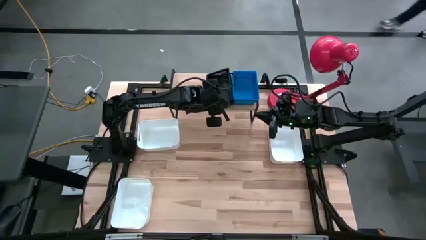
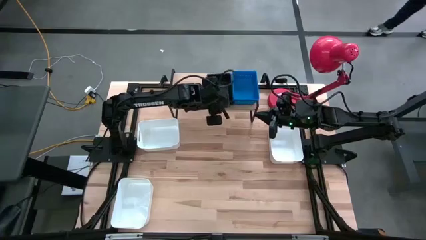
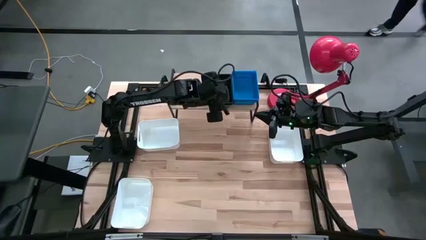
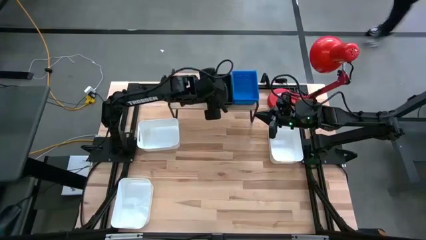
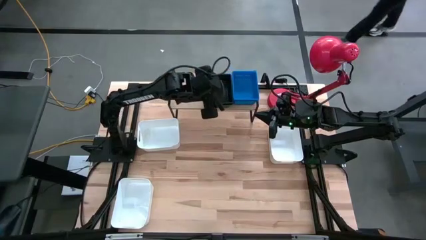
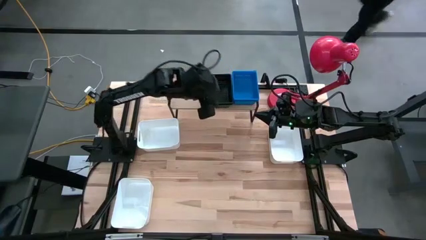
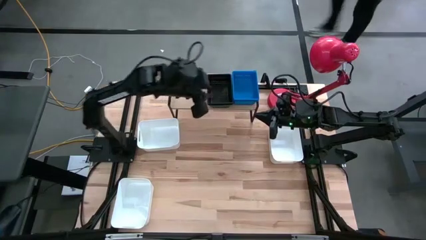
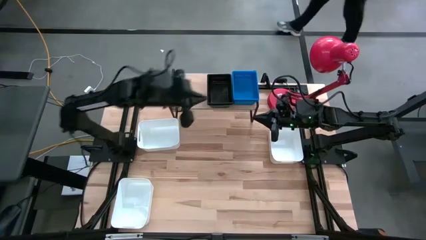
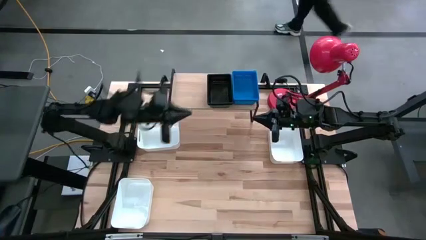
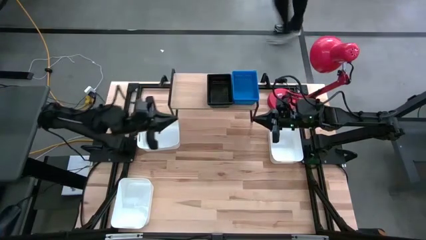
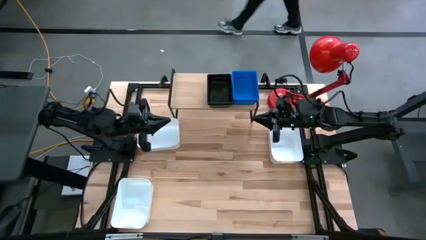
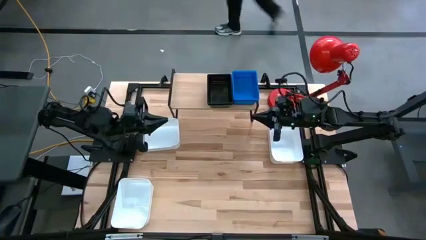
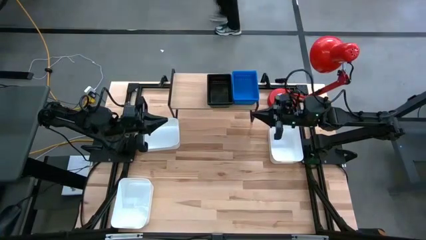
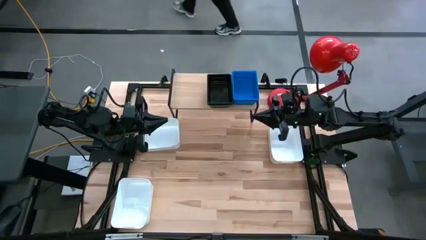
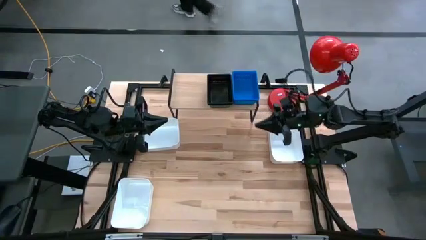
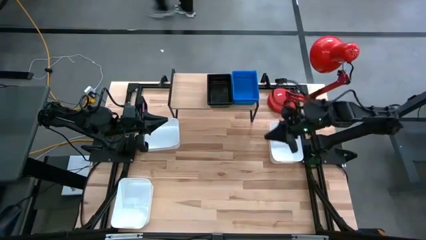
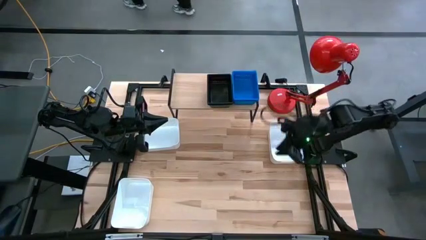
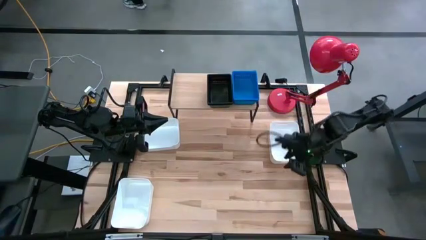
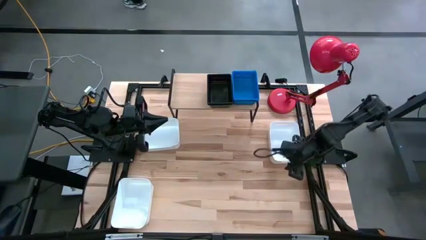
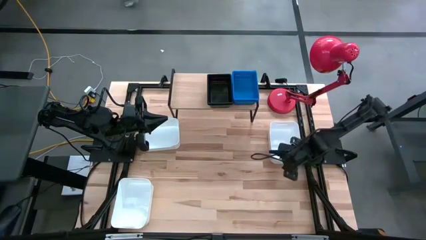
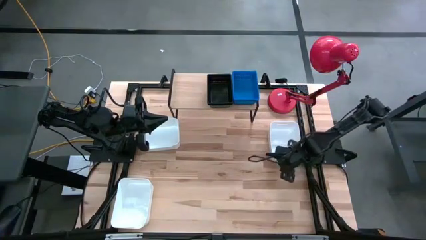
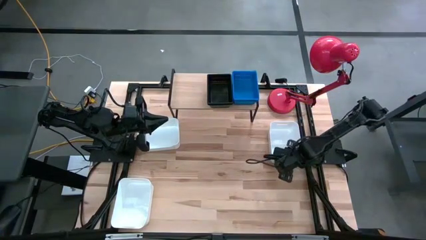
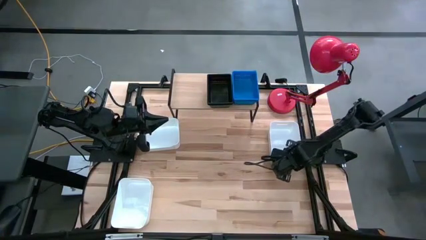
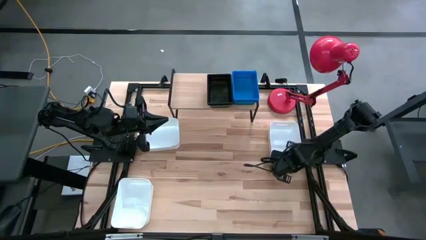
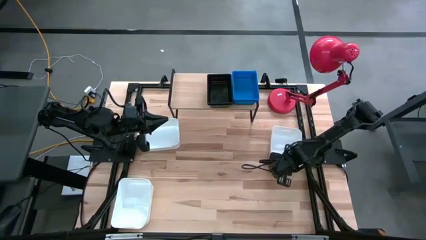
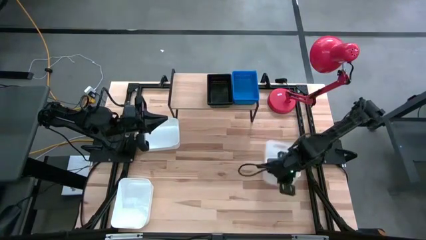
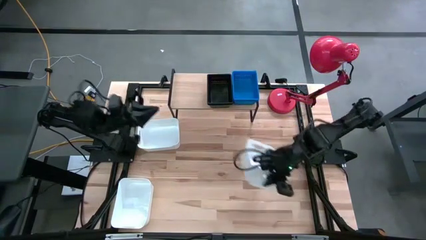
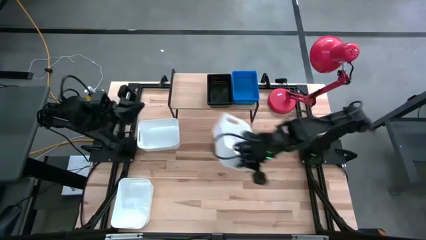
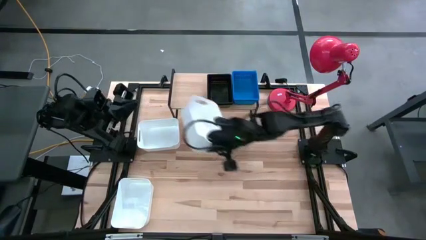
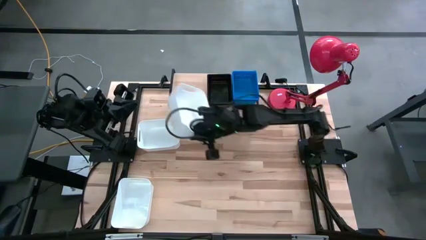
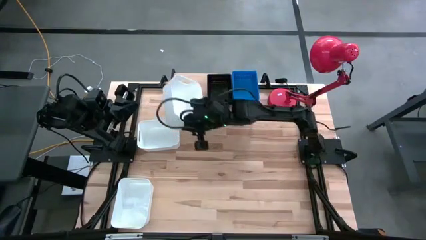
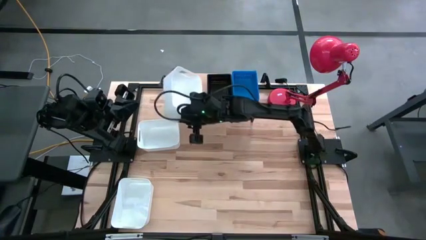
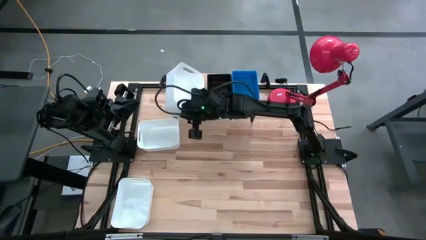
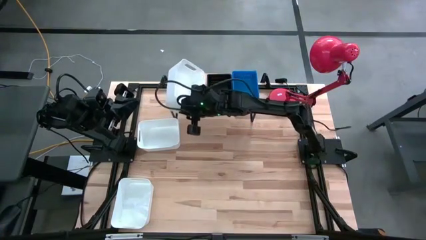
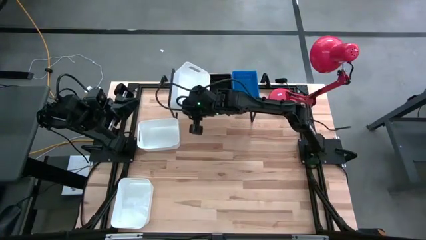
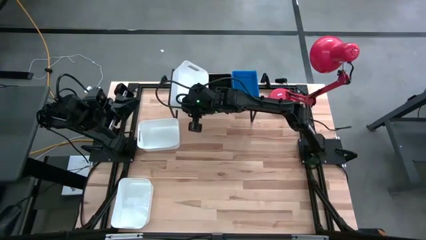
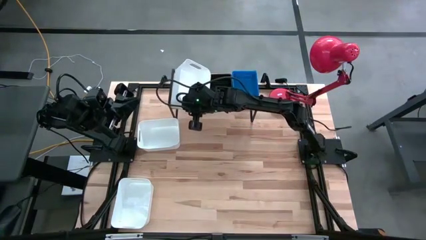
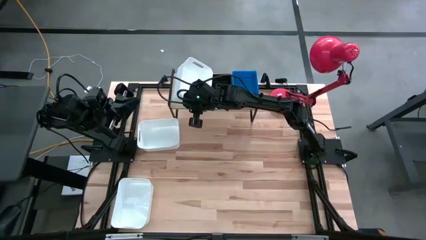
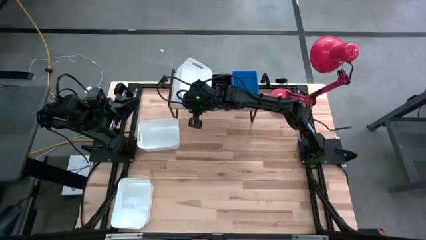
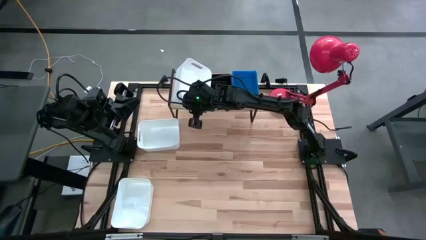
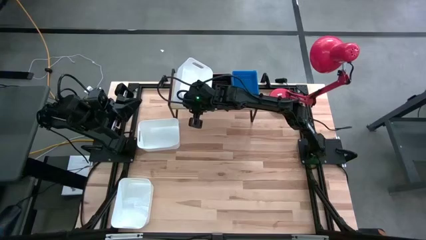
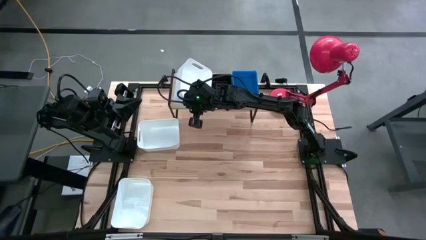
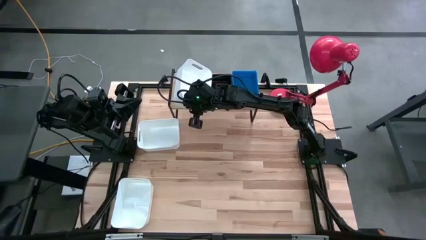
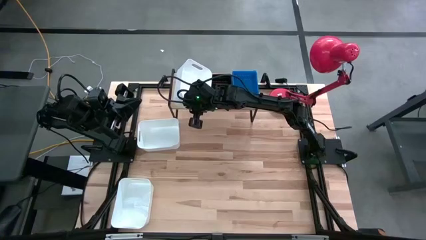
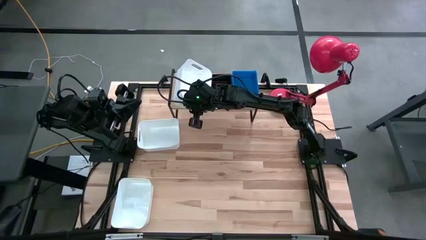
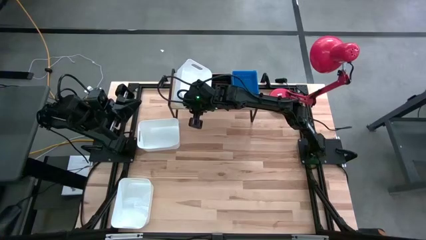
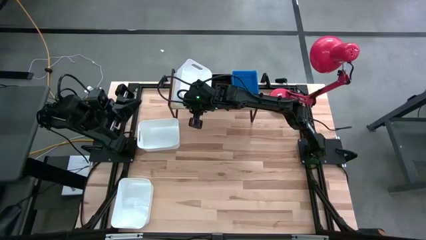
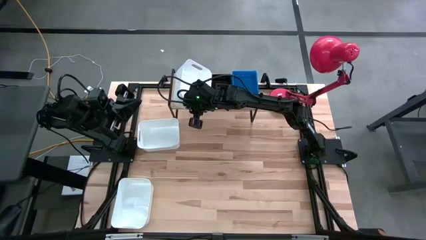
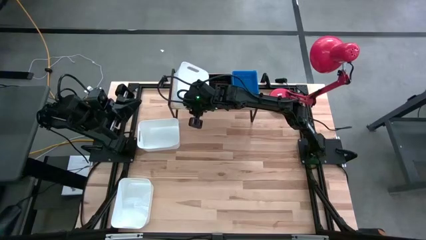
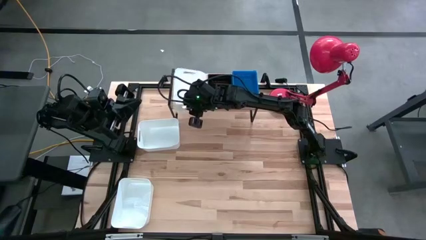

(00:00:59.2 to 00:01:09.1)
Task: Stack baskets on shelf by color
Put the top right white bin on the shelf

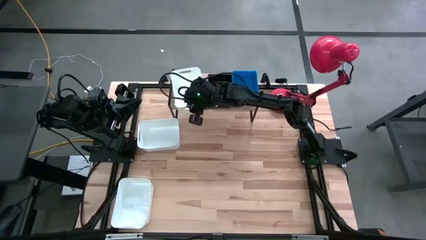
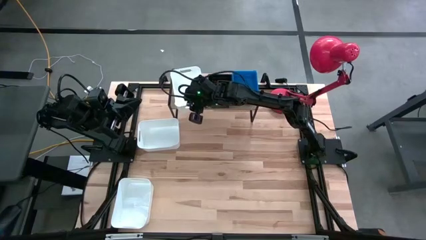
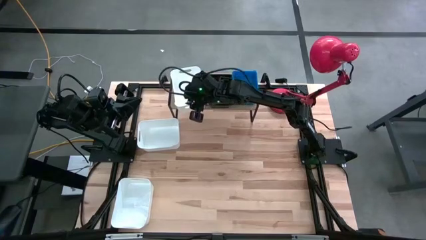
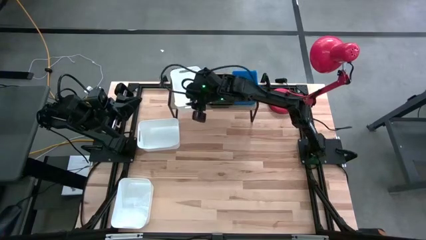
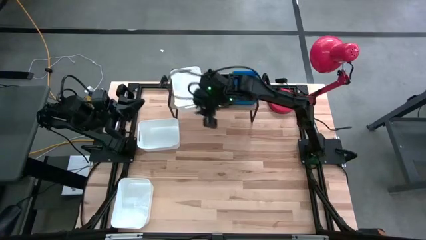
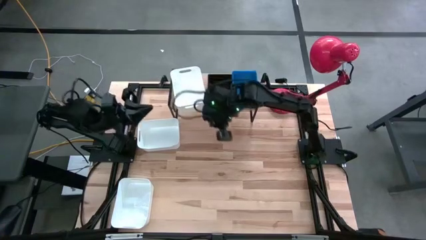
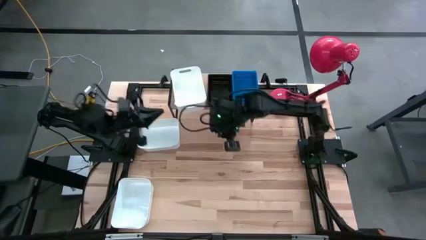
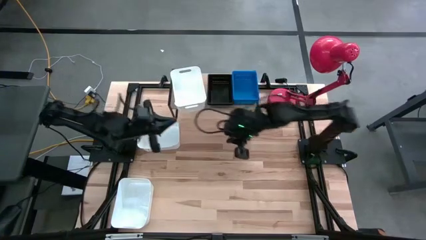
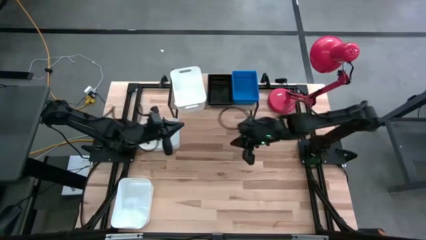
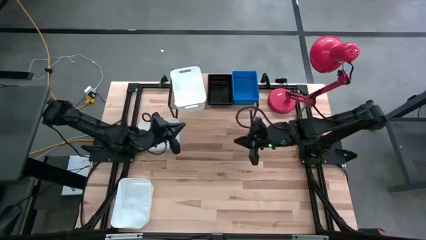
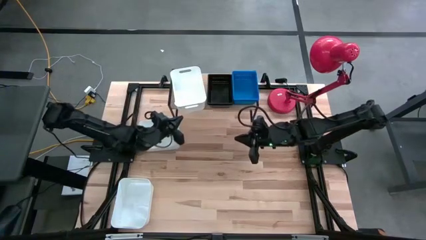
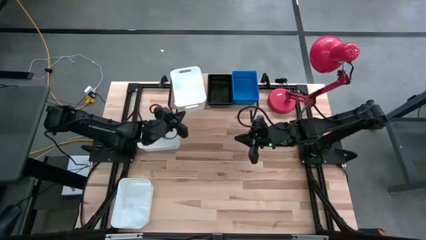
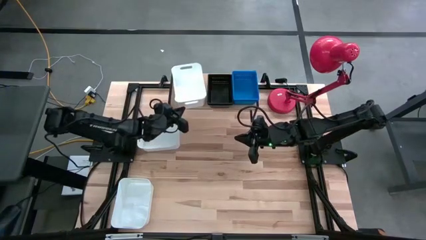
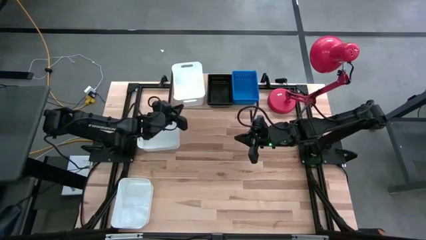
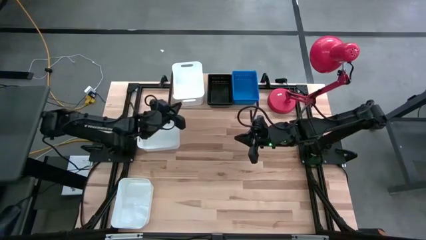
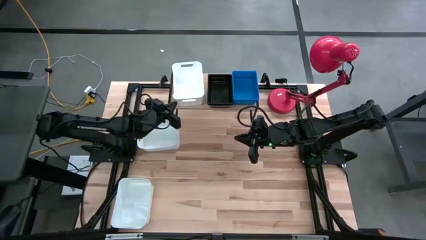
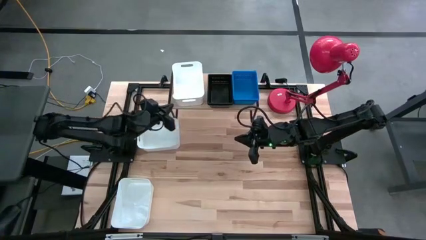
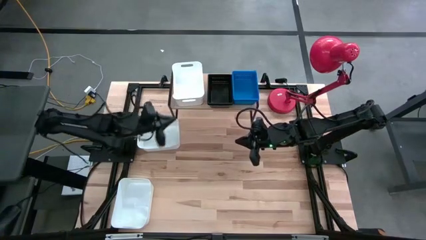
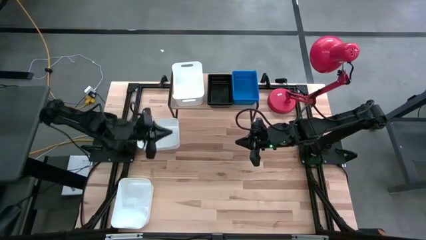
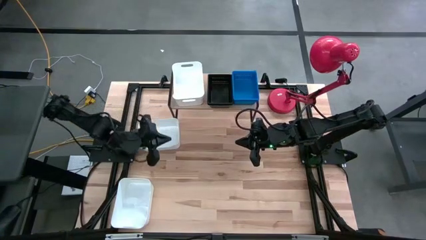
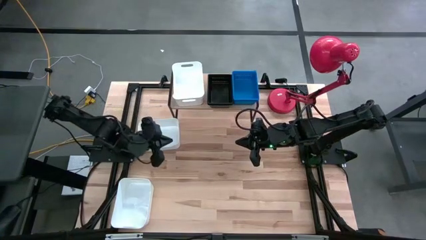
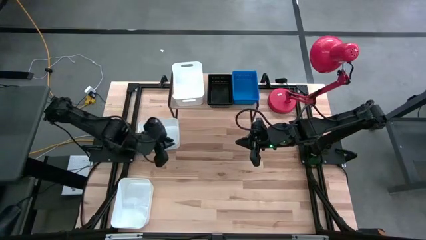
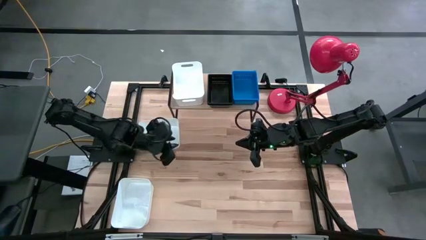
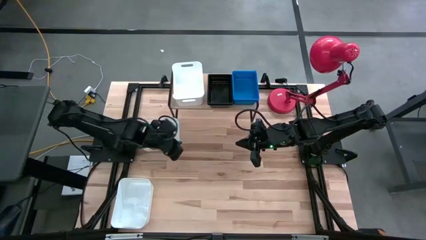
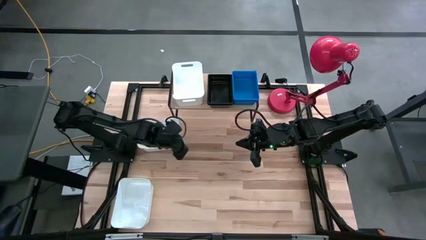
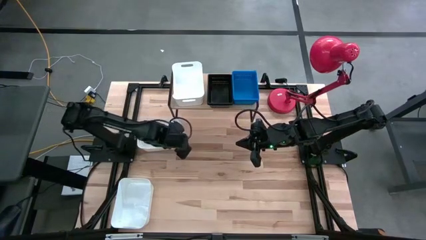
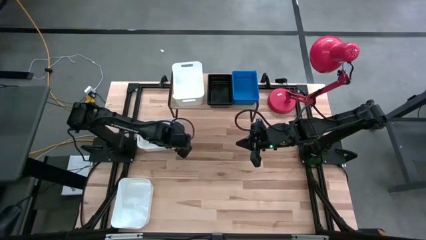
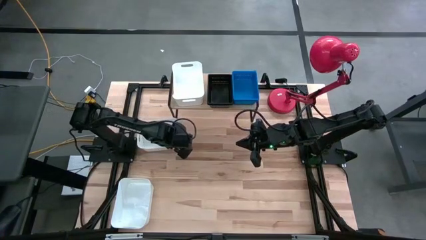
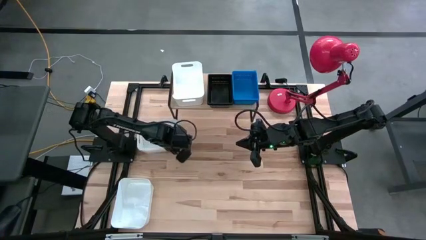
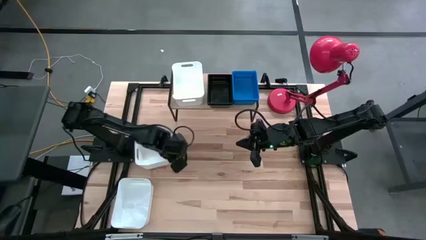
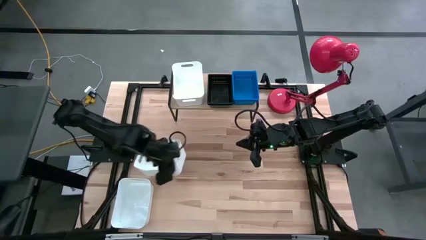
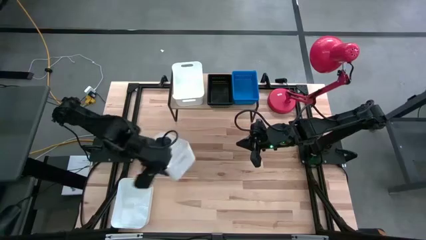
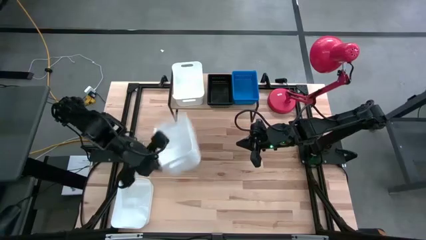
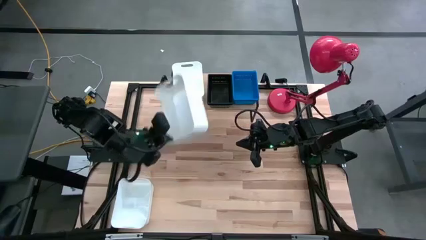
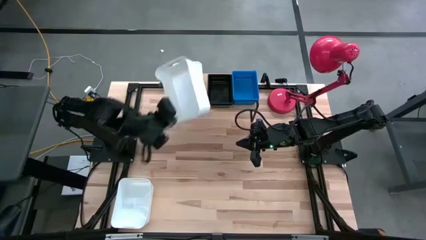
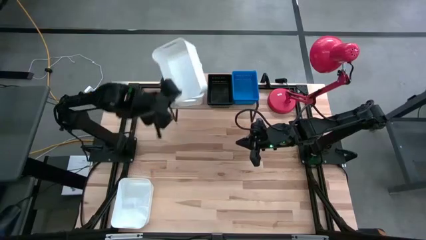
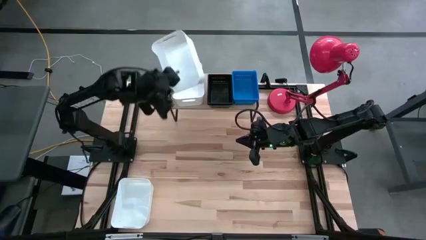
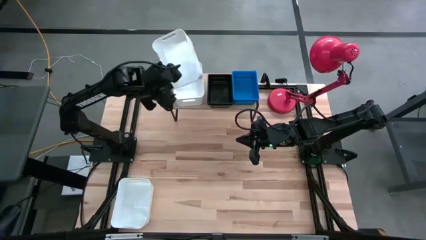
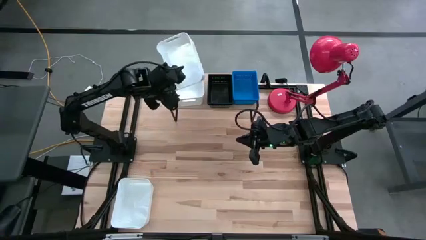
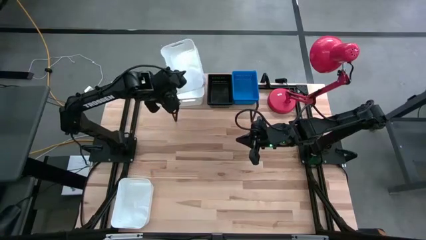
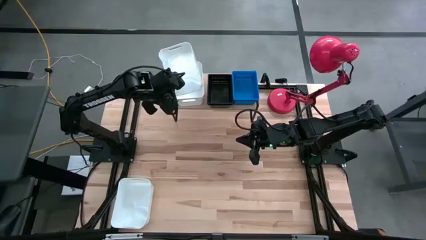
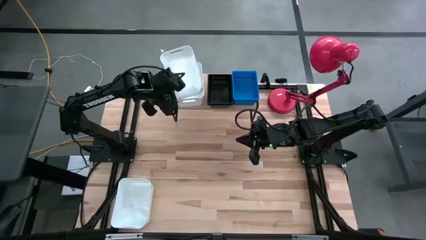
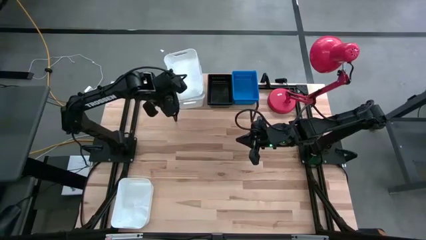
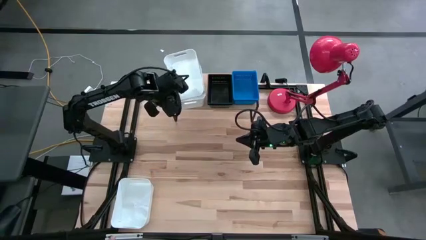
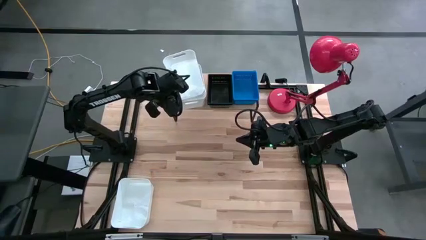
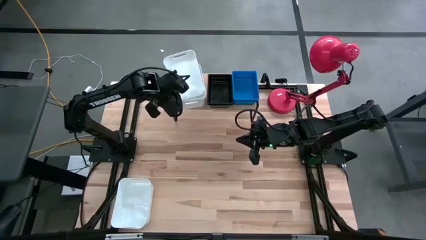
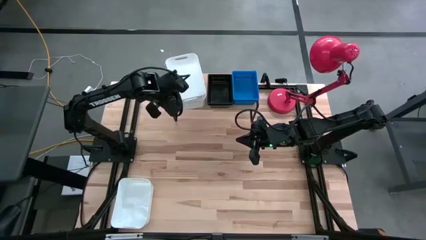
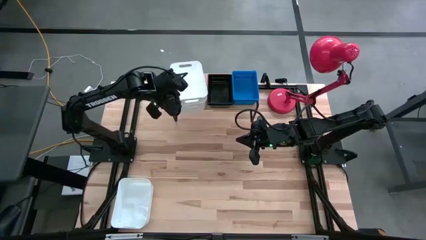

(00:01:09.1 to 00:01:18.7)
Stack the top white bin on top of the white bin on the shelf
